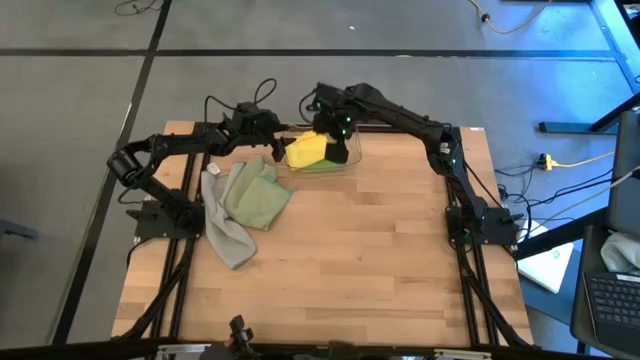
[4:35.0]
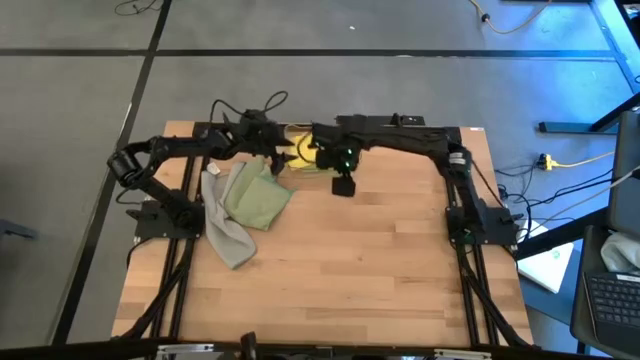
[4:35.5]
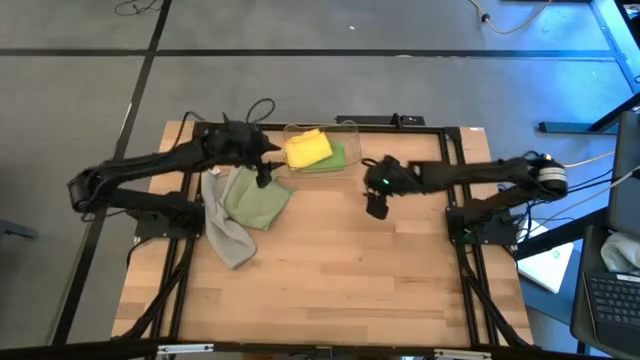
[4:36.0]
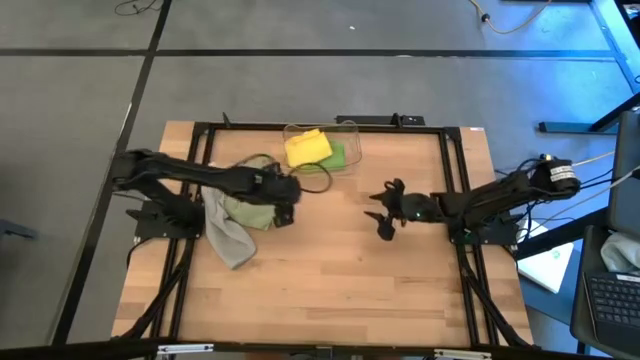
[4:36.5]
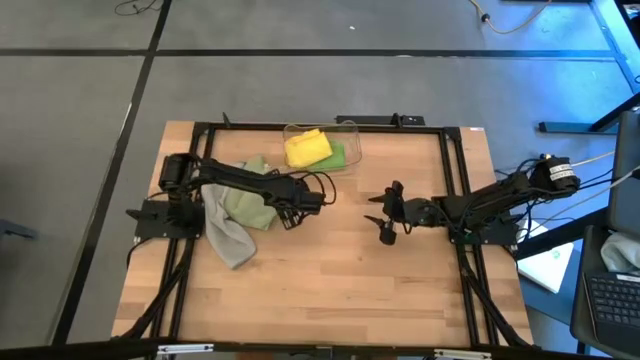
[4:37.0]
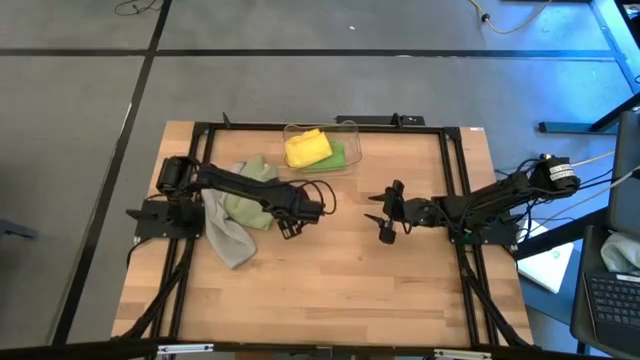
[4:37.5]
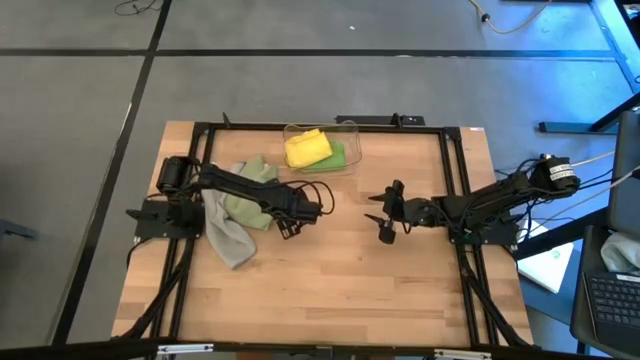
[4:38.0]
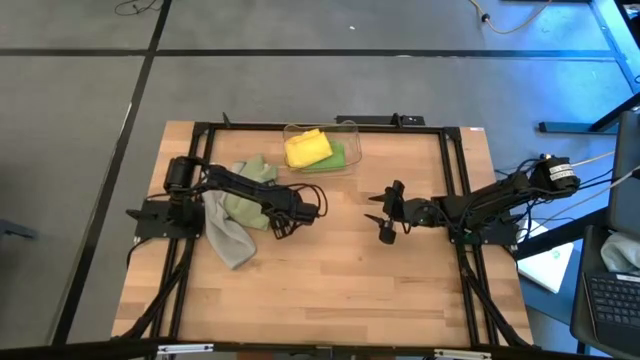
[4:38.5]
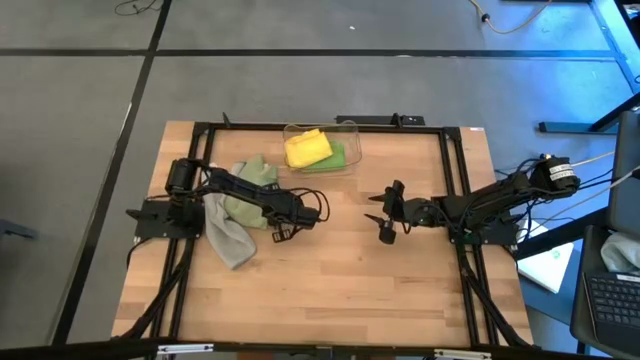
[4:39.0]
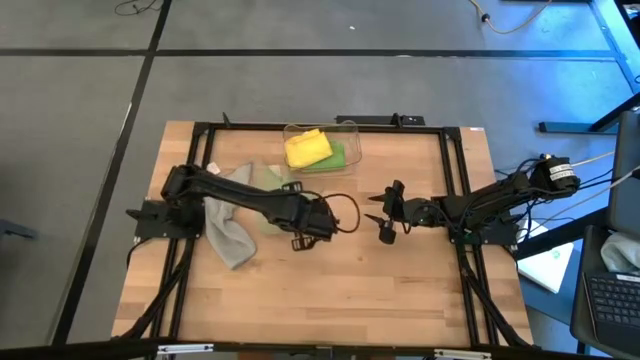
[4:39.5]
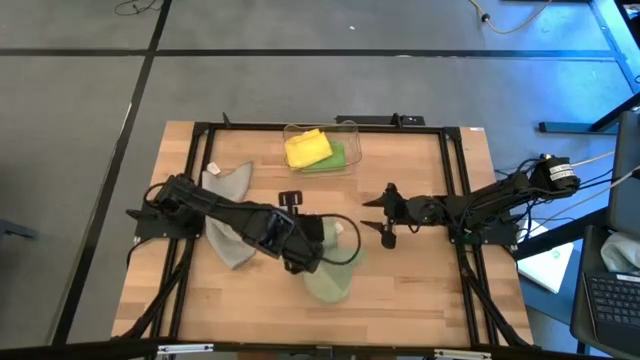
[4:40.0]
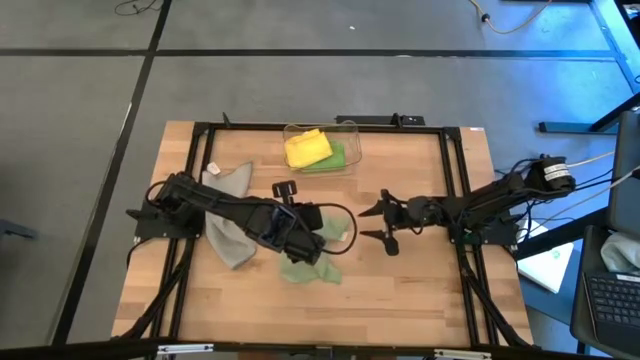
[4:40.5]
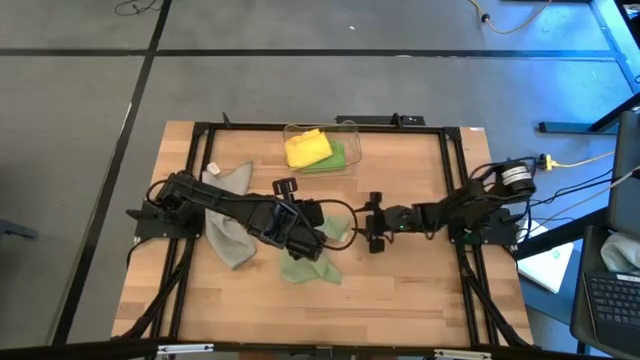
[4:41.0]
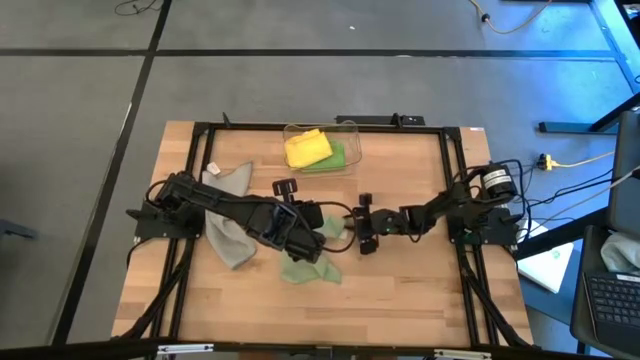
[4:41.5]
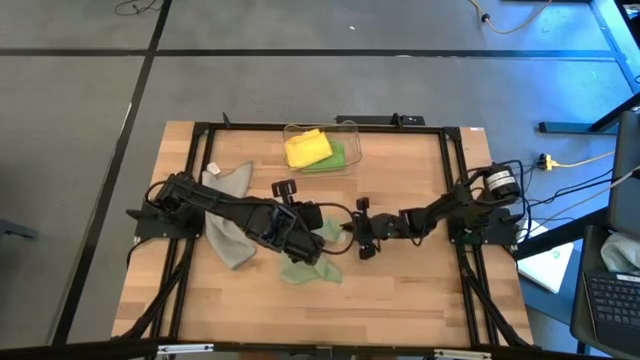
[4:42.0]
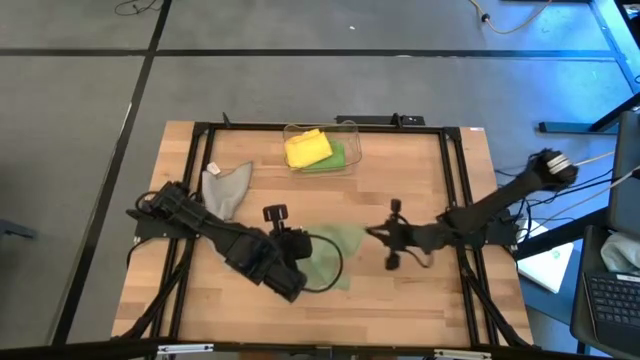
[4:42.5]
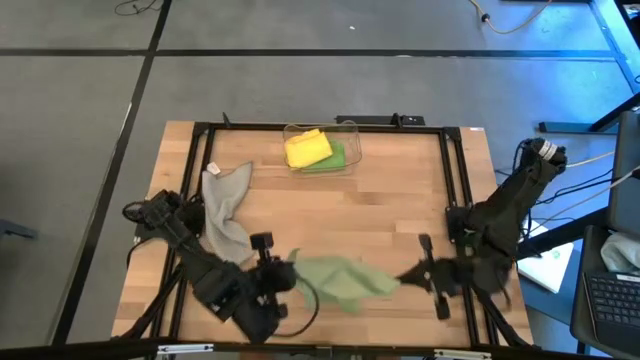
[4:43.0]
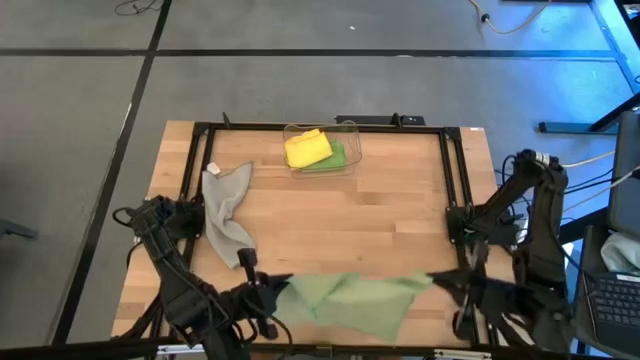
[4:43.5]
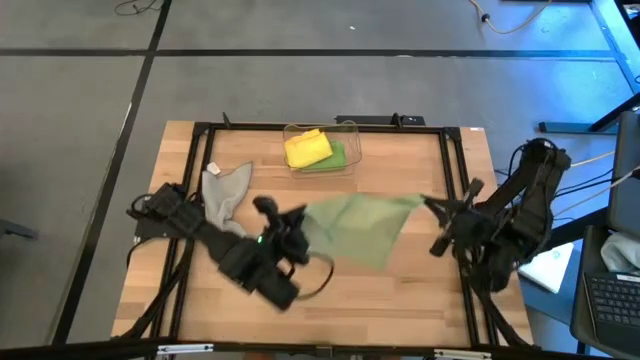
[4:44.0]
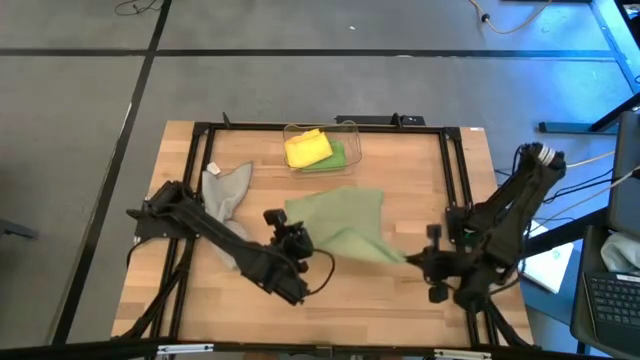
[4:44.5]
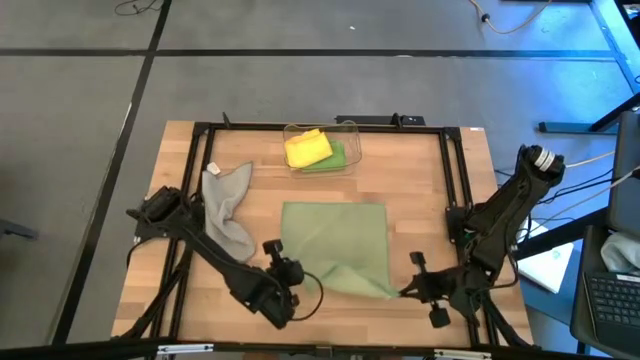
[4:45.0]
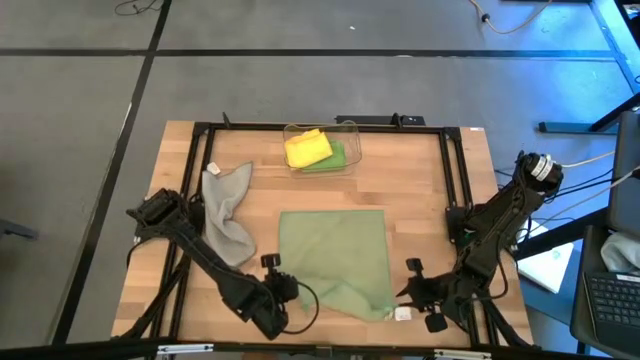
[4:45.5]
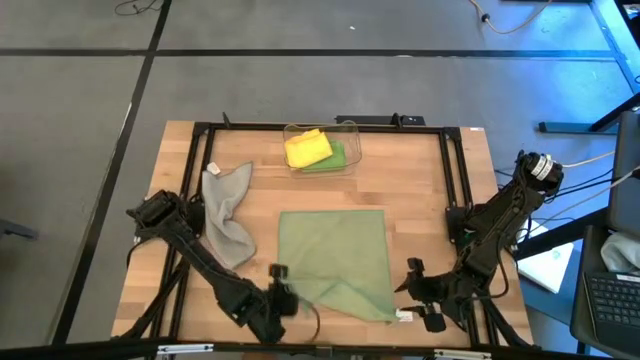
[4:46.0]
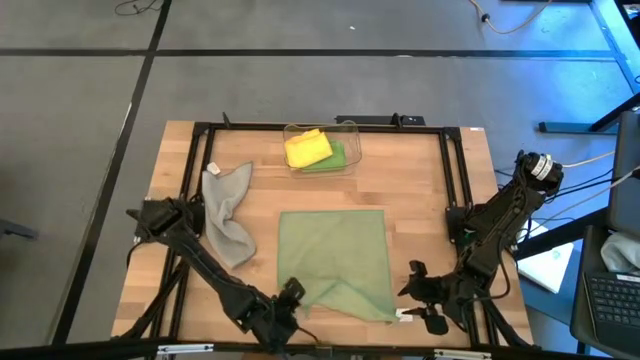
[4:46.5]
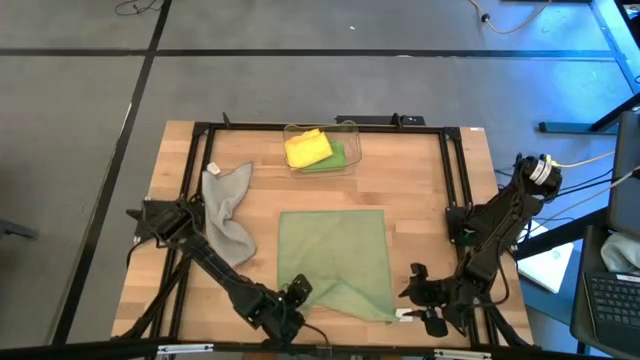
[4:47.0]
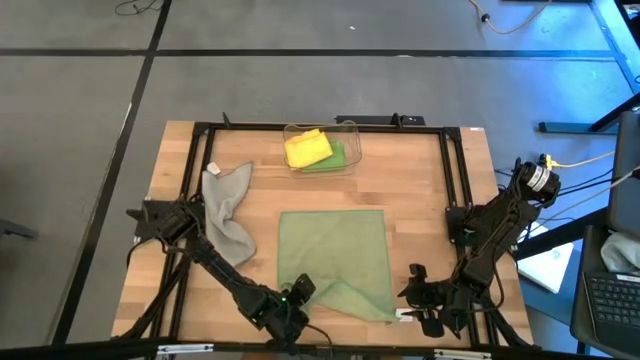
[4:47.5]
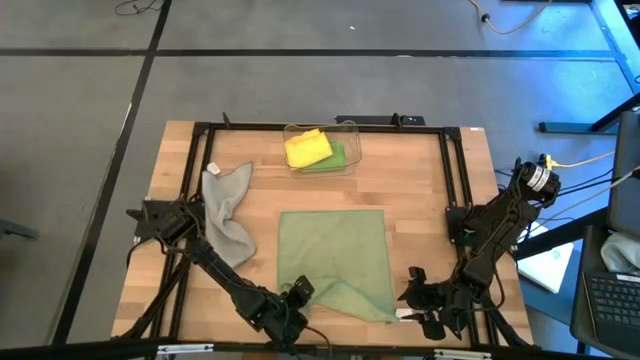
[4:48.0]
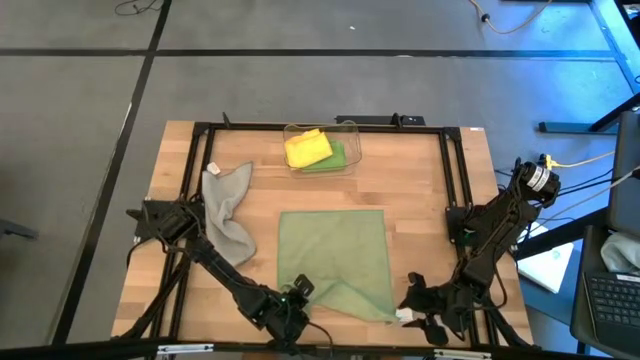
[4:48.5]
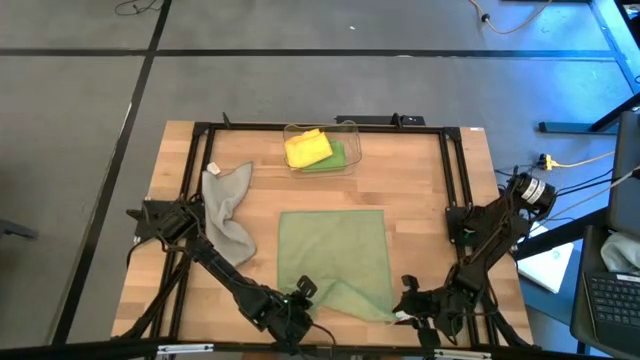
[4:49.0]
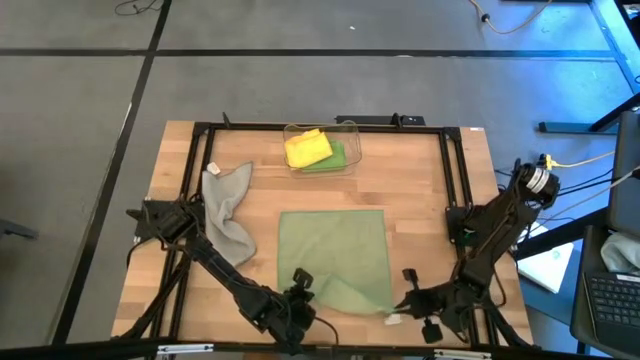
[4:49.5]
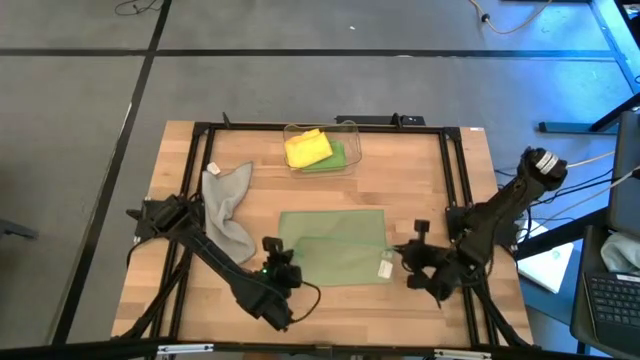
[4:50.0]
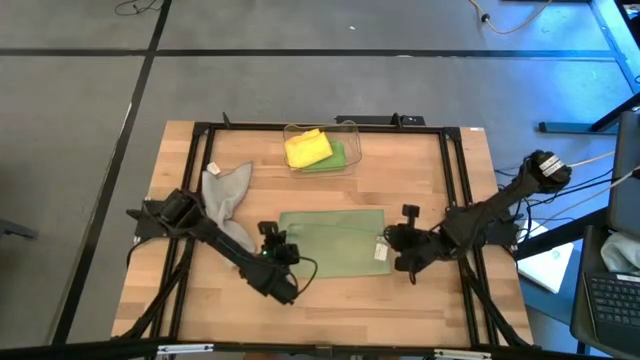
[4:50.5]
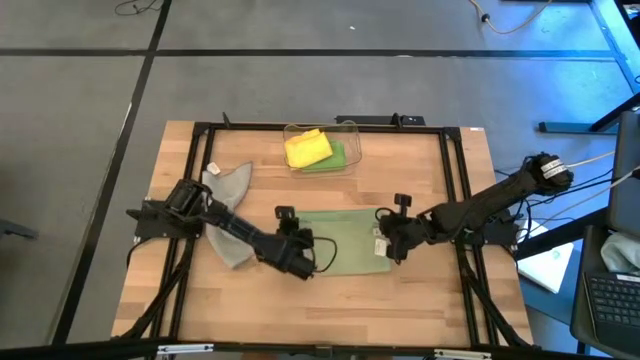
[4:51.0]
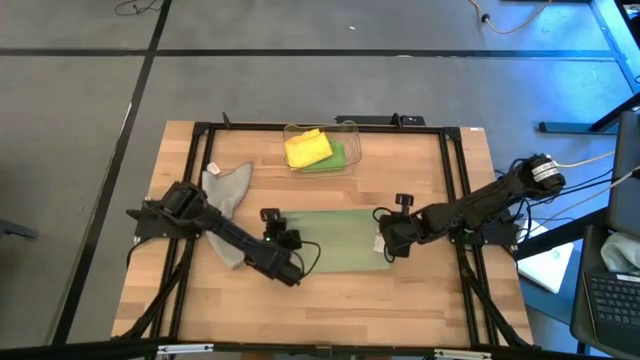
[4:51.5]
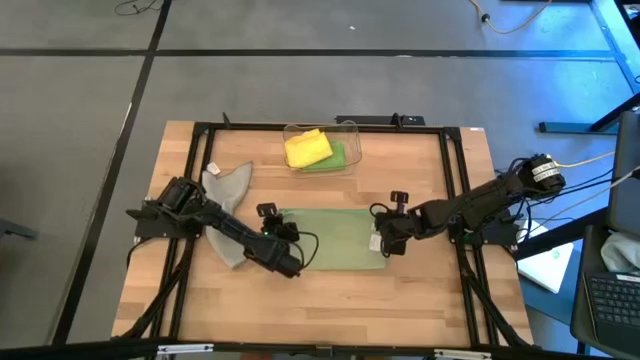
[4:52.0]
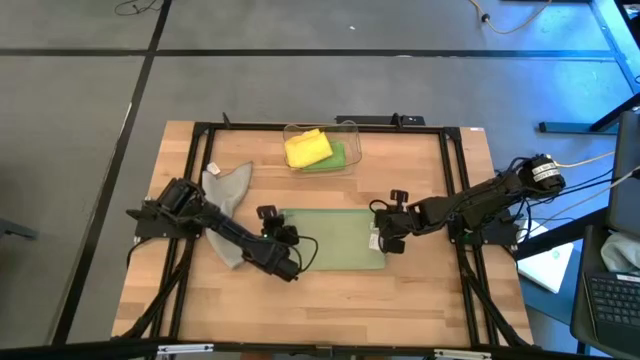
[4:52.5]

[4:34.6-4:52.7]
Task: Fold microfiber towels
Fold the light green microfiber cloth

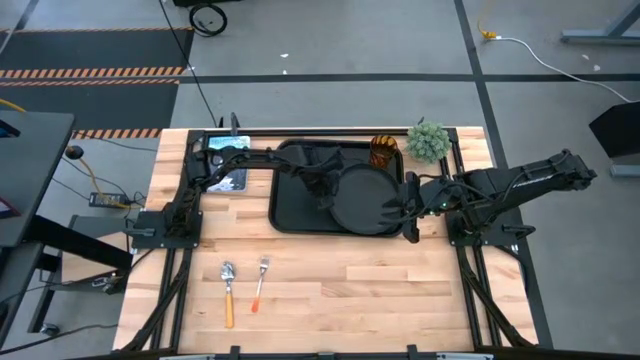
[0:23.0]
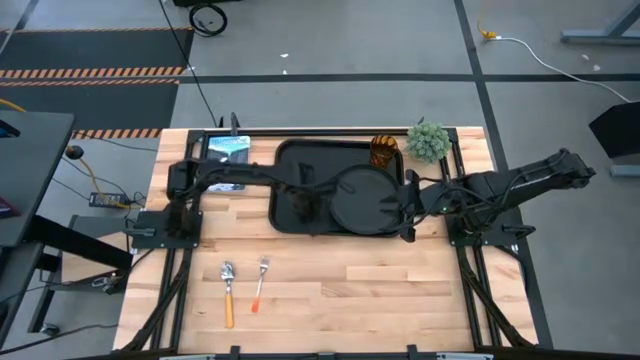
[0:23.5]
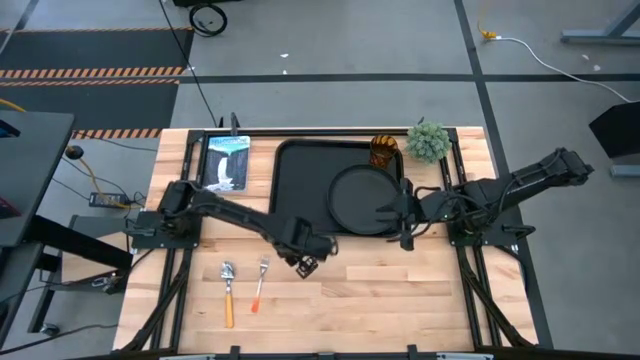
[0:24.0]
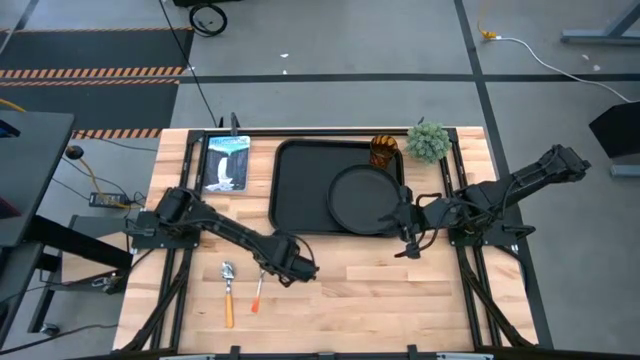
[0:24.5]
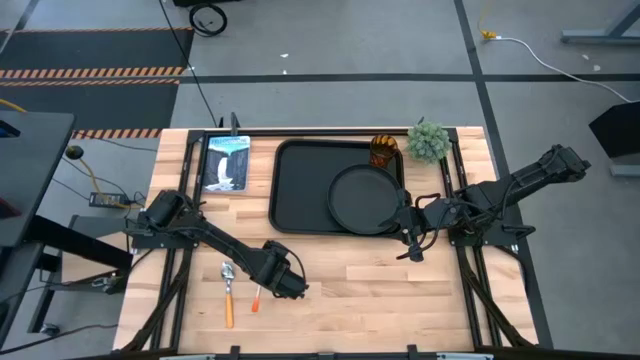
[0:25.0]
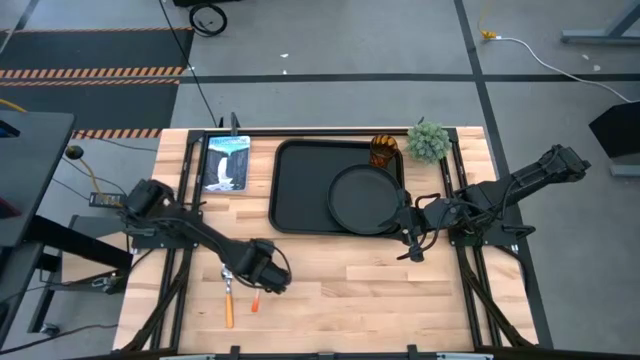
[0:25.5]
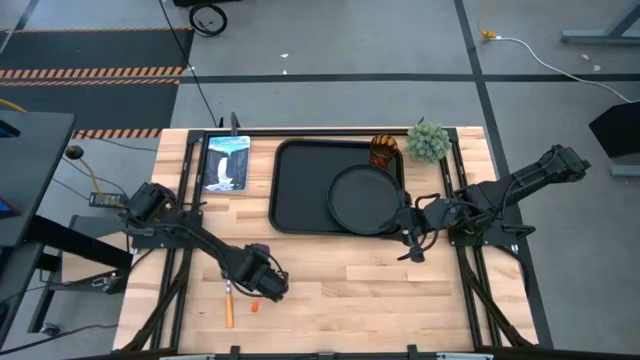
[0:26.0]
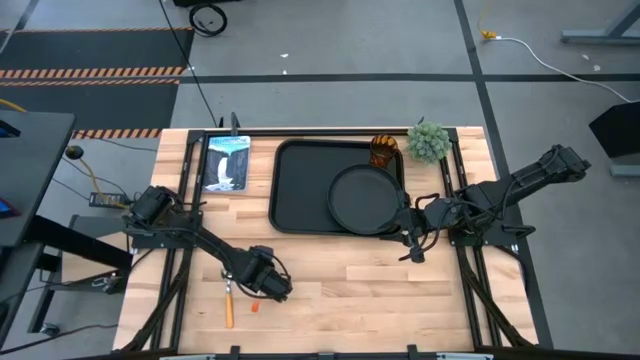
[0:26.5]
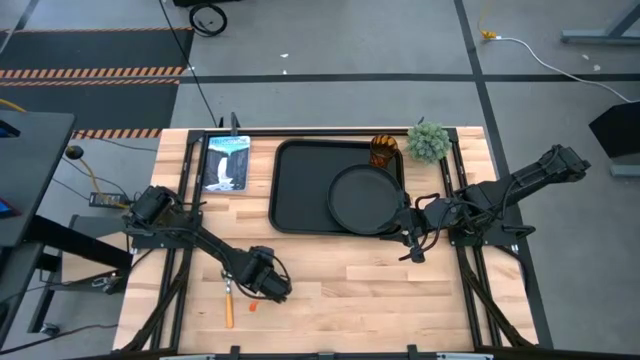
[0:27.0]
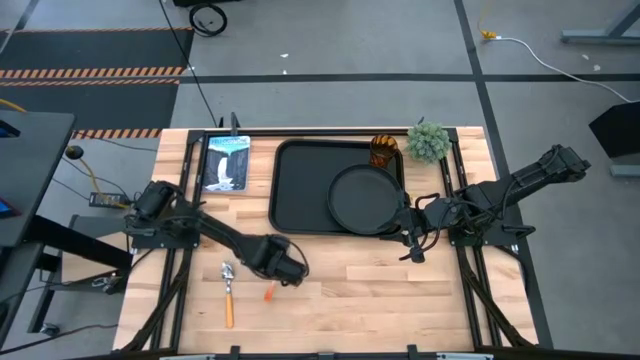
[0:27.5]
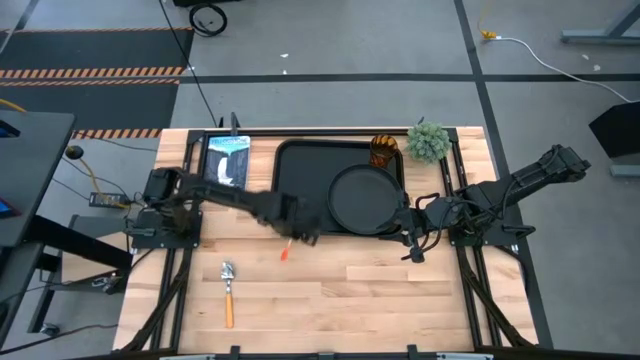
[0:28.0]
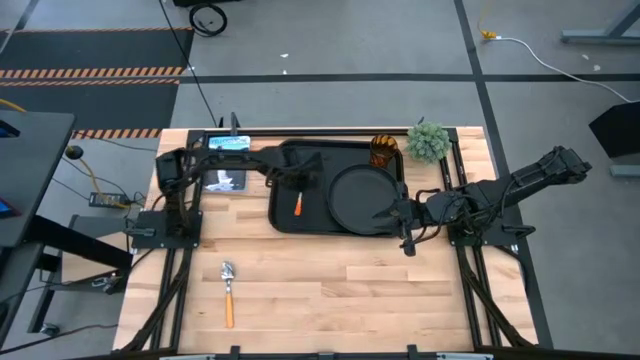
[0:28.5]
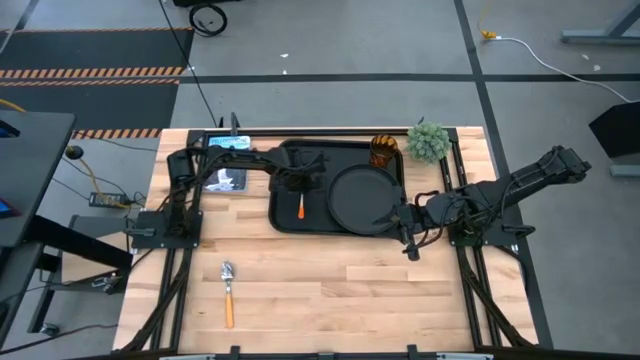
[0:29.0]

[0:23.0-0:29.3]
Task: Pick and place plate/cup/fork/spoon on tray
Put the orange fork on the black tray to the left side of the black plate
